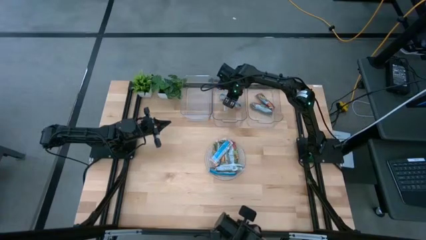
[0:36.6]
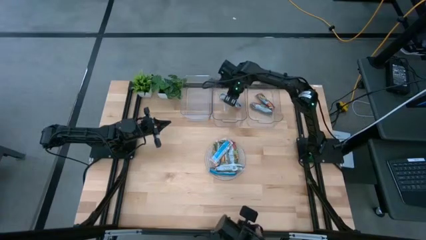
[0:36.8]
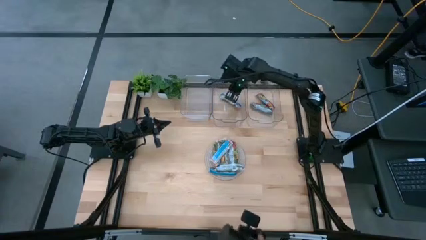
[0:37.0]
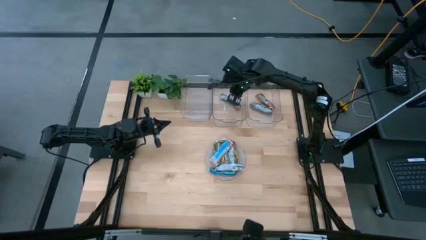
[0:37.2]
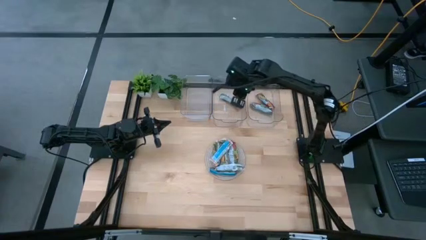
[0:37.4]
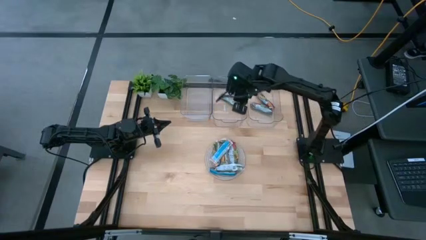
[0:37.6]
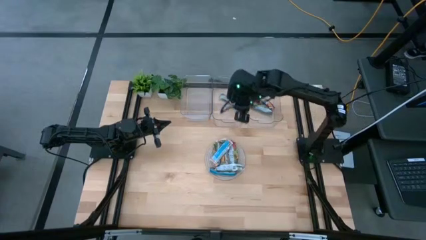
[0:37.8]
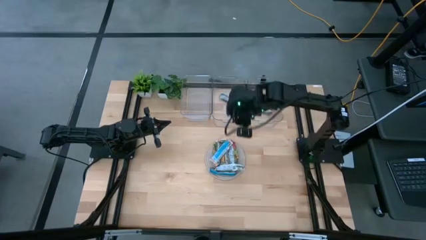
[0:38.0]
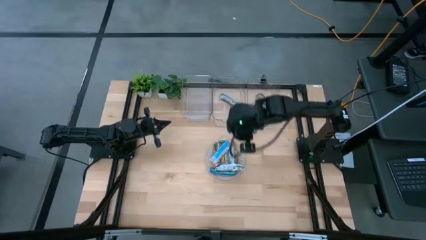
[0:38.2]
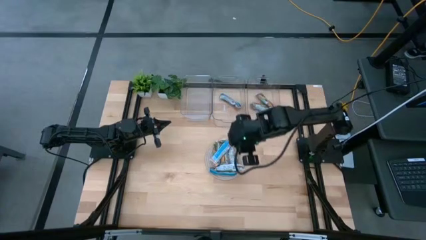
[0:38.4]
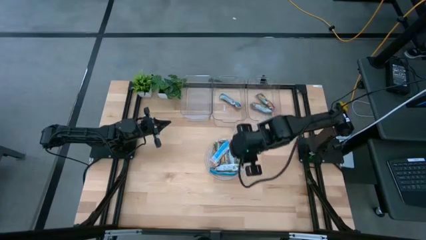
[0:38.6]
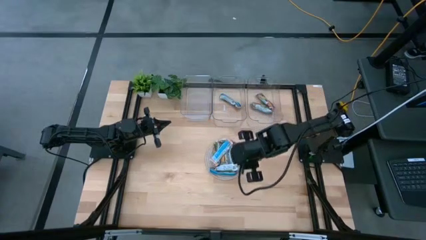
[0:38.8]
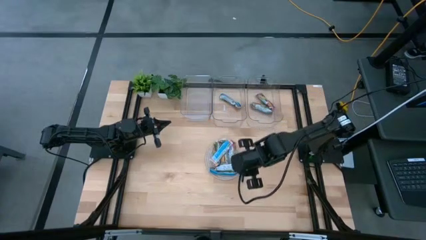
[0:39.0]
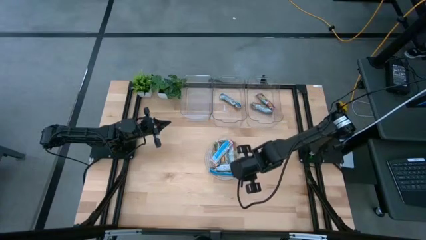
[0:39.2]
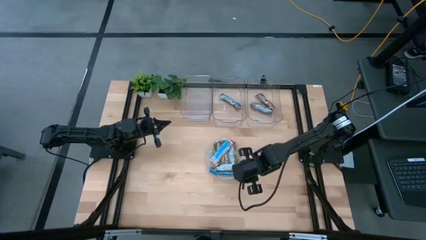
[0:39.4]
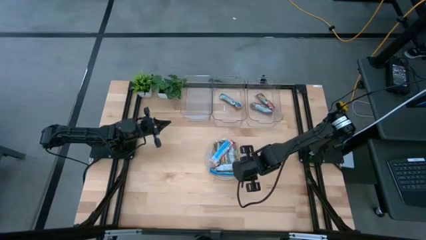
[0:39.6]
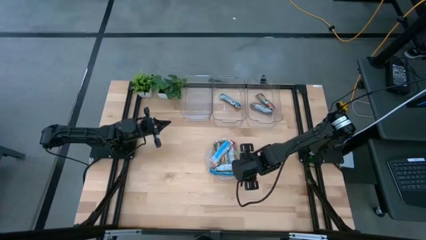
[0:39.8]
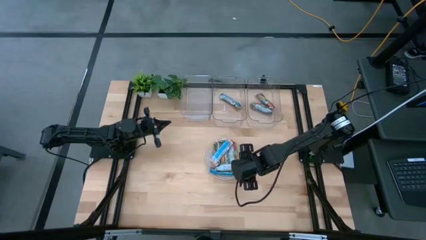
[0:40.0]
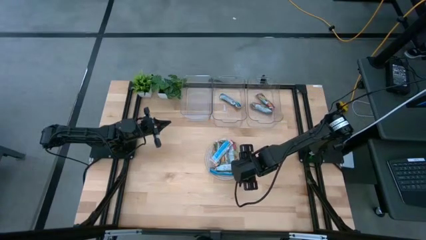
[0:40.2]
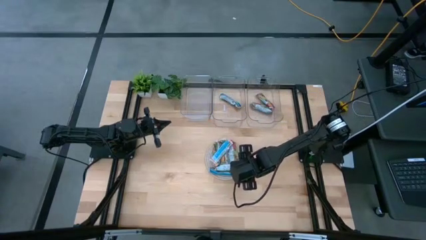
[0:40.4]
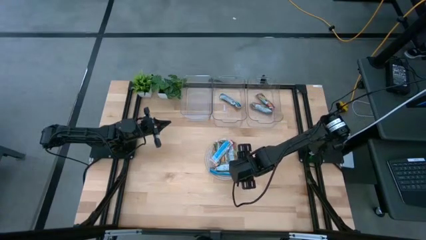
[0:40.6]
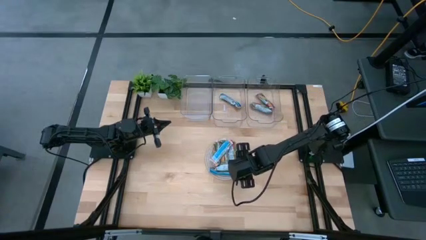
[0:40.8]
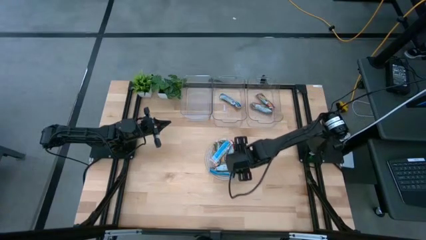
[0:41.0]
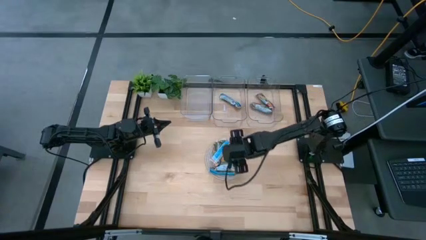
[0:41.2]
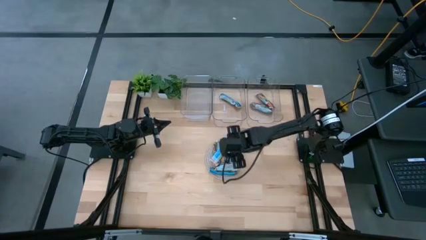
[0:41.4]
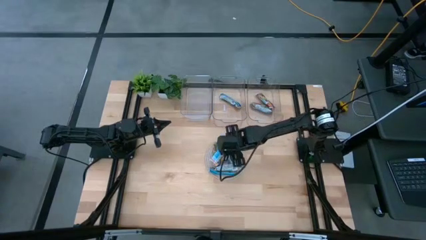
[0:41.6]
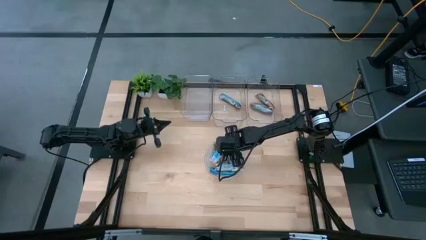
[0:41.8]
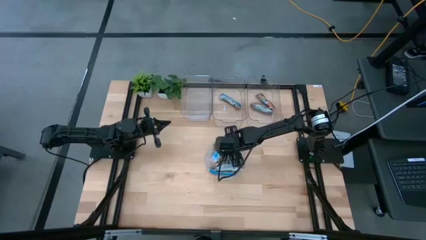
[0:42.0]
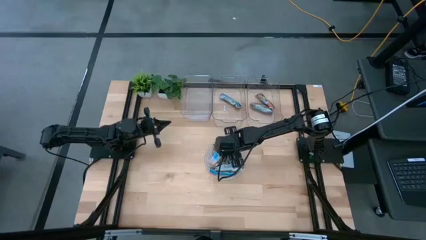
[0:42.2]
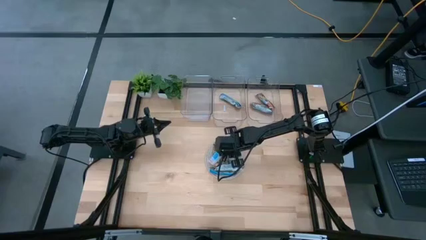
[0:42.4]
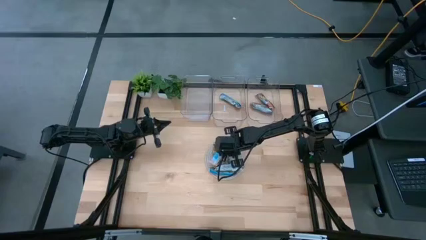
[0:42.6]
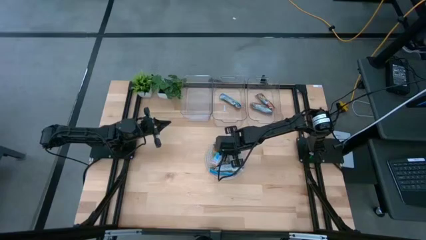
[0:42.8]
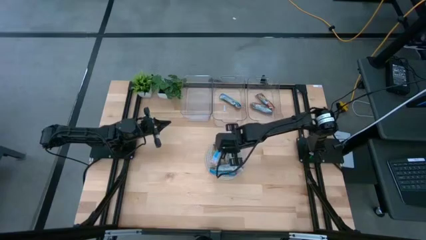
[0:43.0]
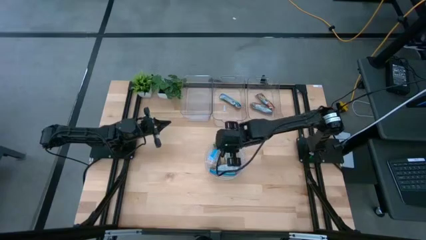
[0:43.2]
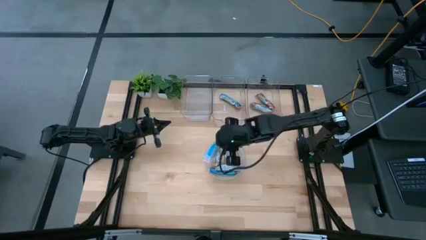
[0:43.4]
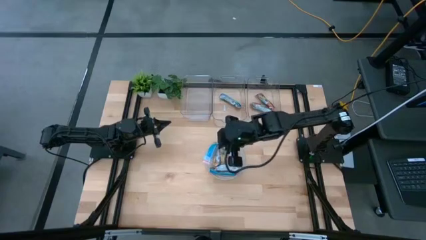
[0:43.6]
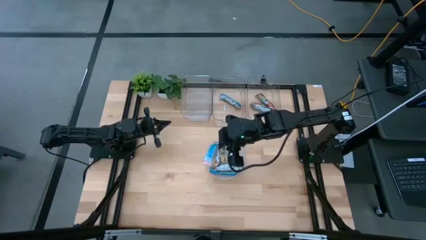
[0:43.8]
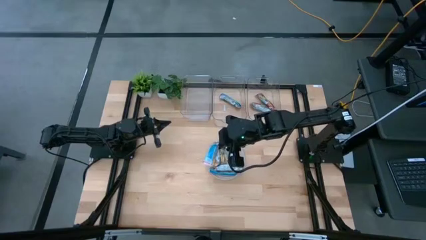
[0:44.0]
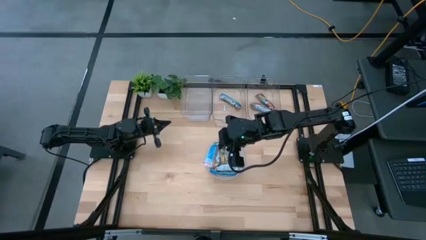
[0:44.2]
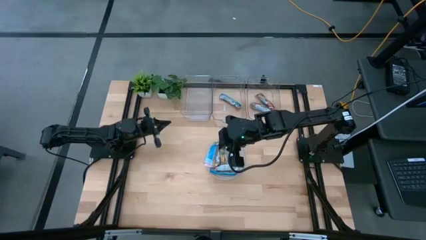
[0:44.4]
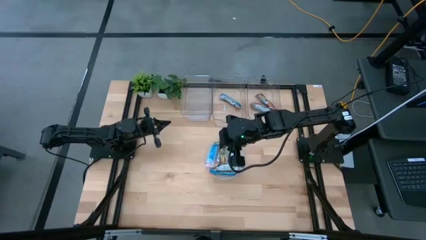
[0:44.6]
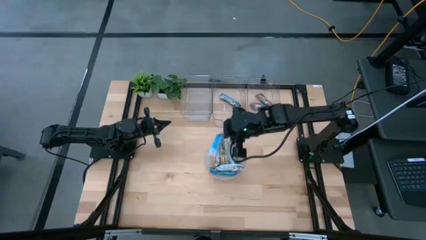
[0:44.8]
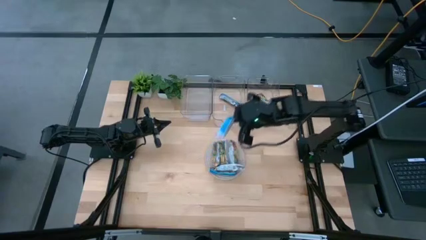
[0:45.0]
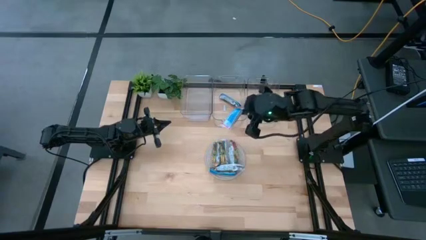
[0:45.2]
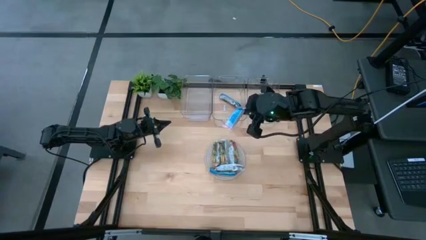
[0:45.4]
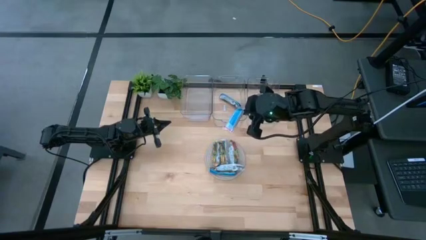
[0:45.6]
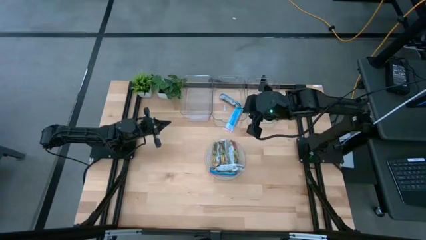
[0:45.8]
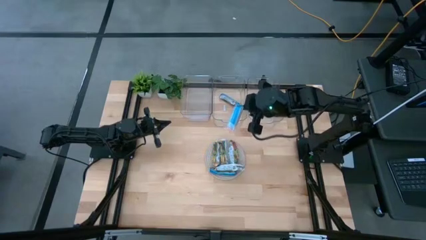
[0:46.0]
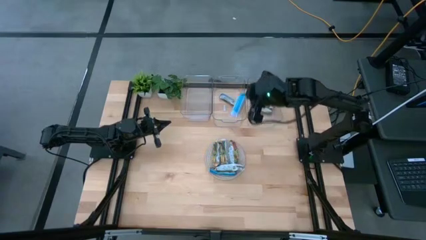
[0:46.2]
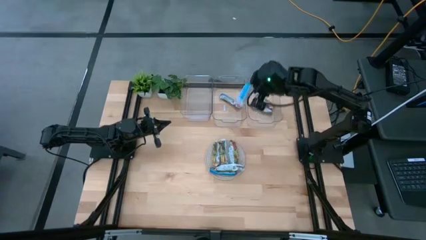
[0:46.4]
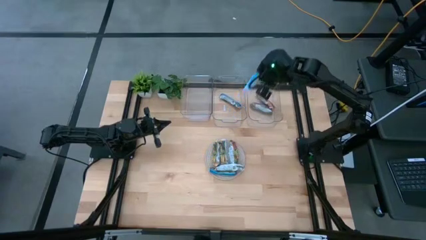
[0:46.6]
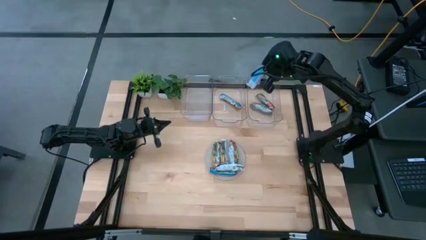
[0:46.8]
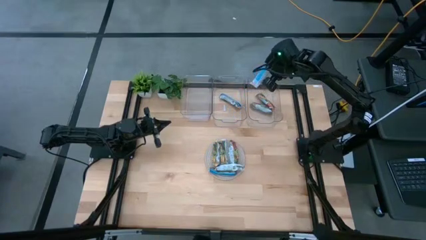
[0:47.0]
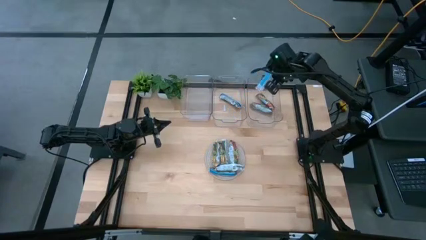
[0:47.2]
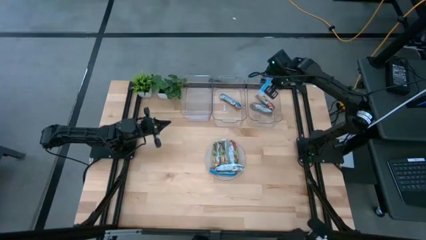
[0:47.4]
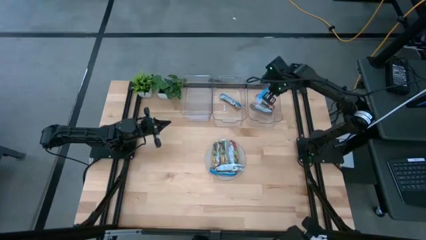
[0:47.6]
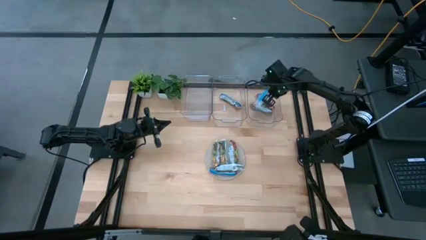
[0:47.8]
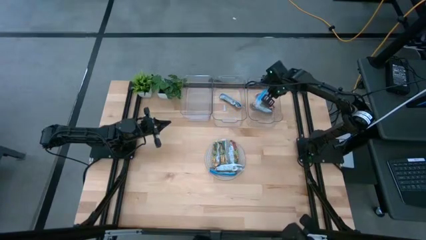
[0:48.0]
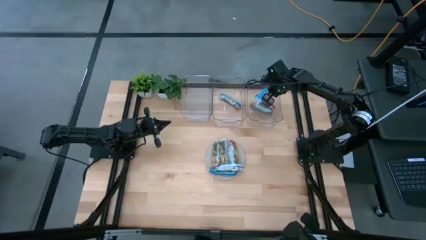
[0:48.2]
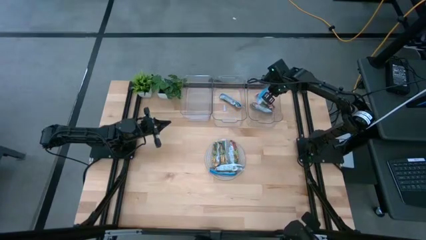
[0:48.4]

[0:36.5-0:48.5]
Task: Pick and place Granola Bars by type
Put the red granola bar into the right transparent bin
